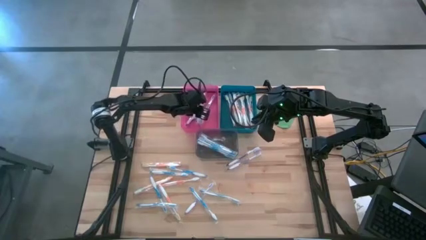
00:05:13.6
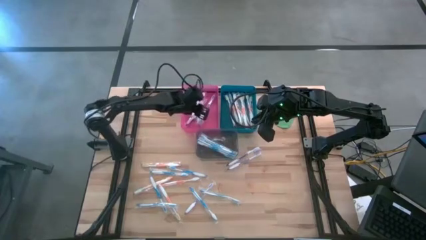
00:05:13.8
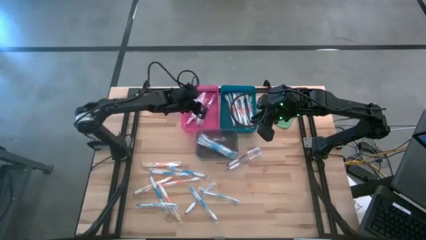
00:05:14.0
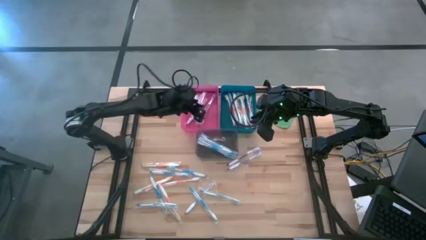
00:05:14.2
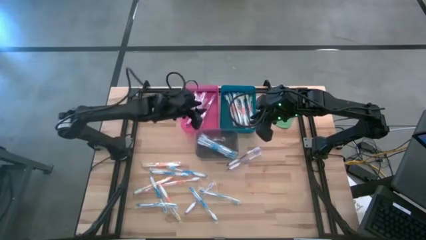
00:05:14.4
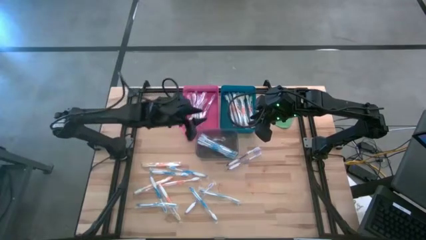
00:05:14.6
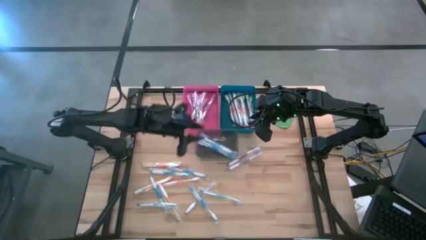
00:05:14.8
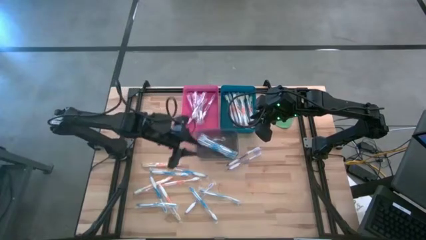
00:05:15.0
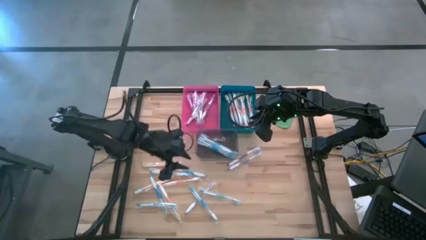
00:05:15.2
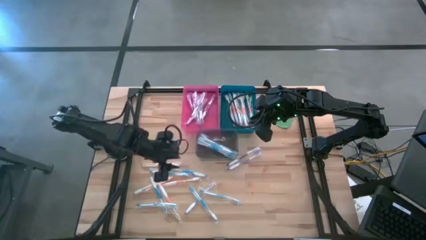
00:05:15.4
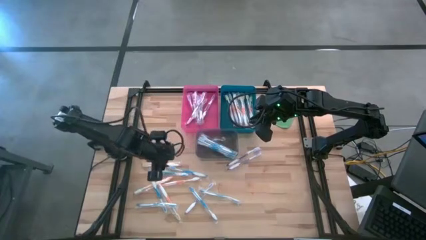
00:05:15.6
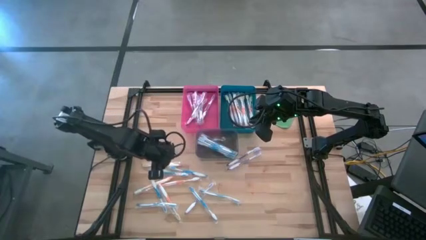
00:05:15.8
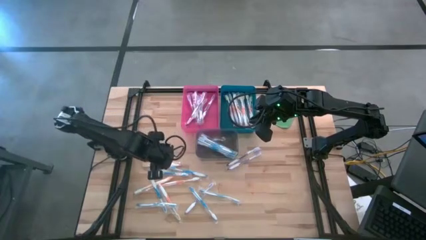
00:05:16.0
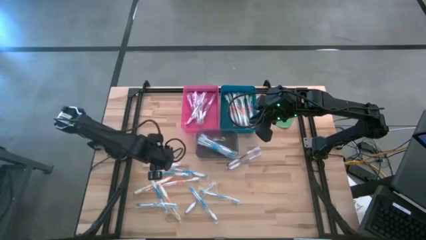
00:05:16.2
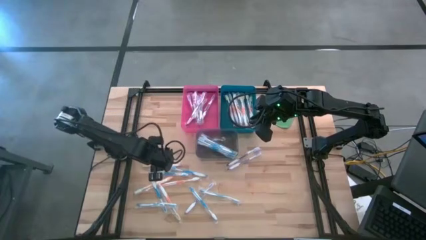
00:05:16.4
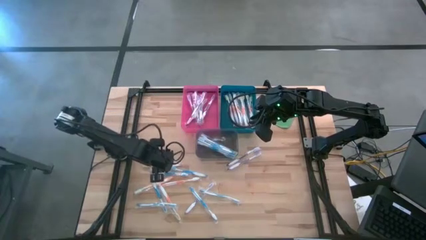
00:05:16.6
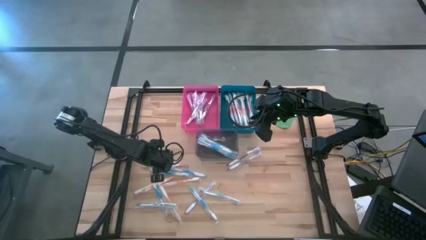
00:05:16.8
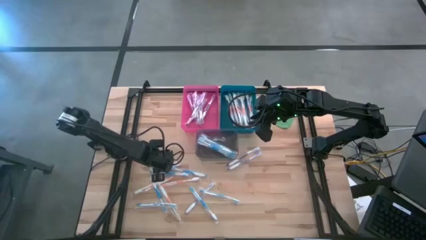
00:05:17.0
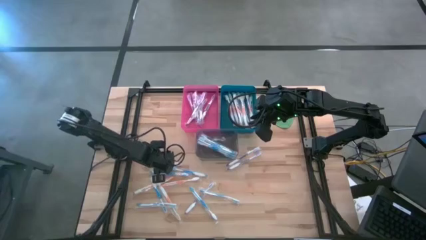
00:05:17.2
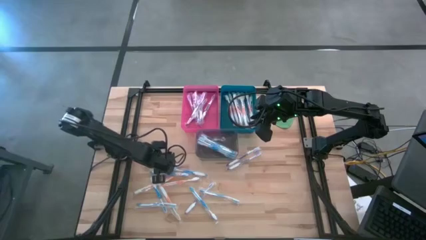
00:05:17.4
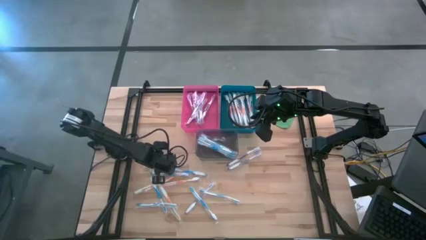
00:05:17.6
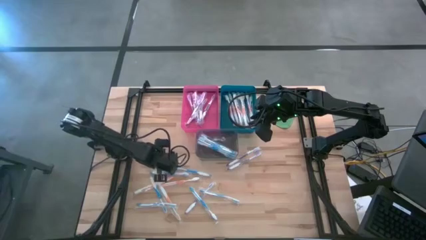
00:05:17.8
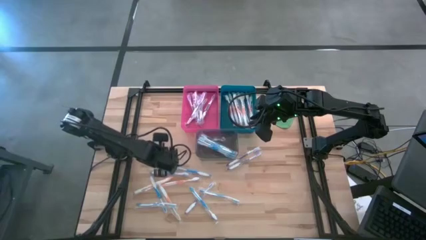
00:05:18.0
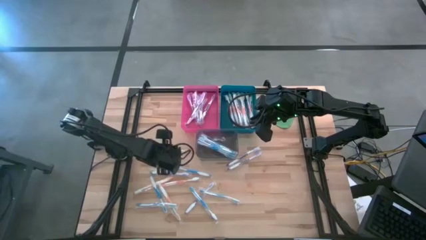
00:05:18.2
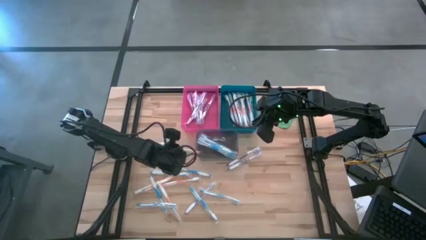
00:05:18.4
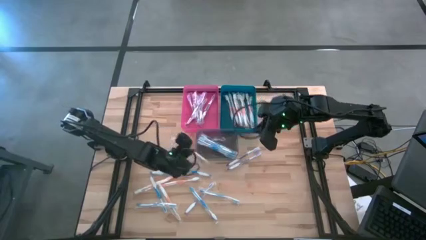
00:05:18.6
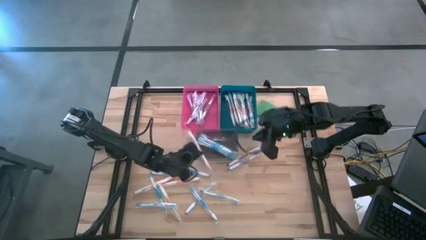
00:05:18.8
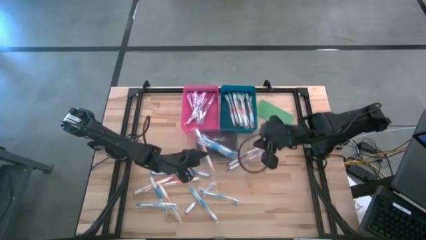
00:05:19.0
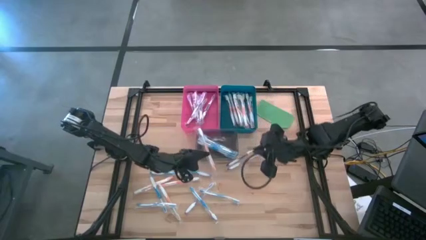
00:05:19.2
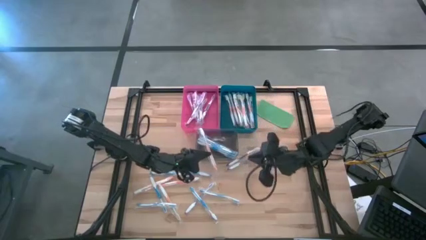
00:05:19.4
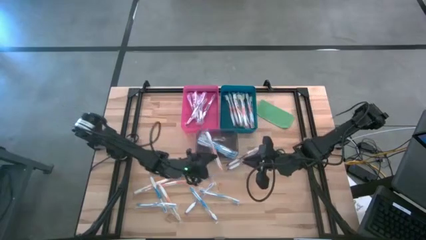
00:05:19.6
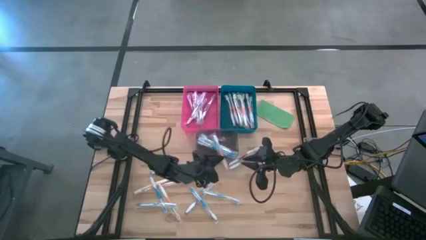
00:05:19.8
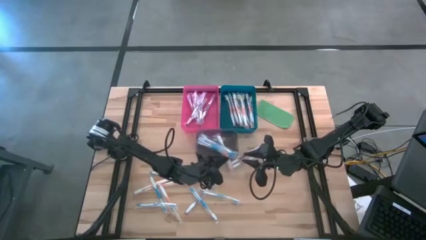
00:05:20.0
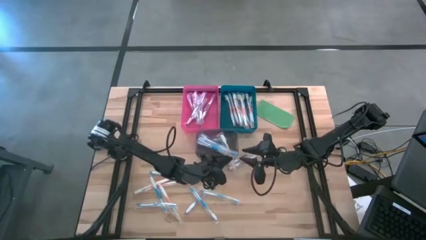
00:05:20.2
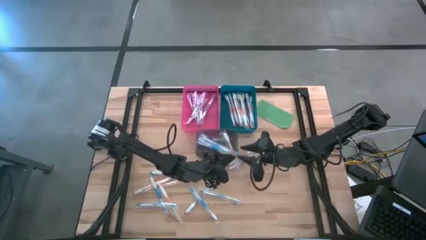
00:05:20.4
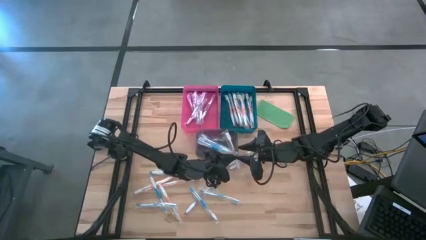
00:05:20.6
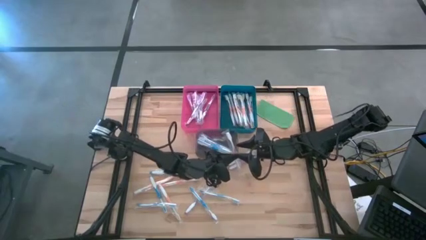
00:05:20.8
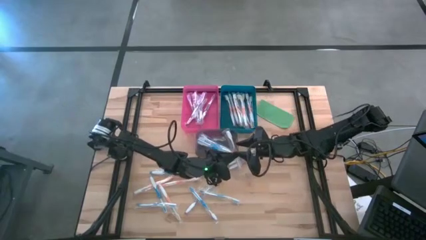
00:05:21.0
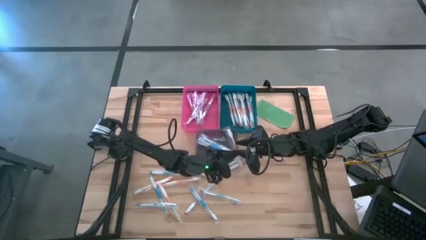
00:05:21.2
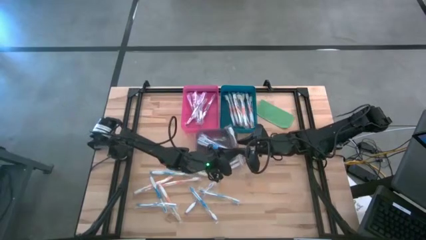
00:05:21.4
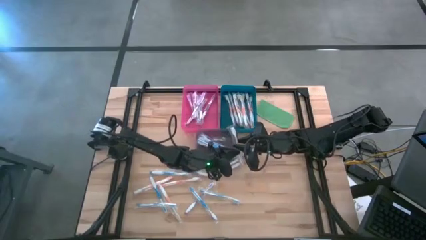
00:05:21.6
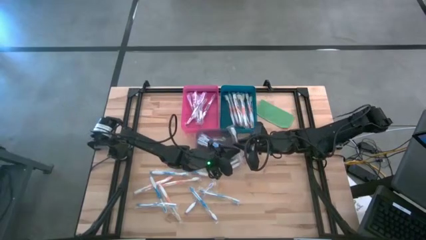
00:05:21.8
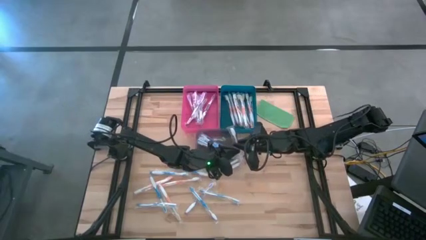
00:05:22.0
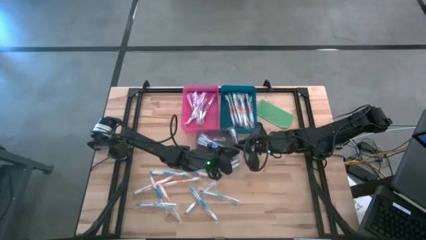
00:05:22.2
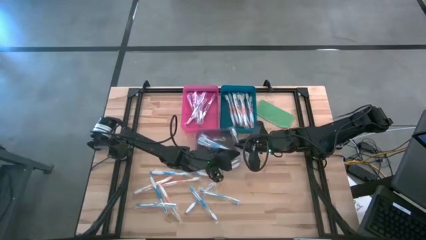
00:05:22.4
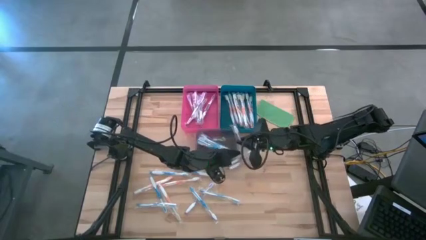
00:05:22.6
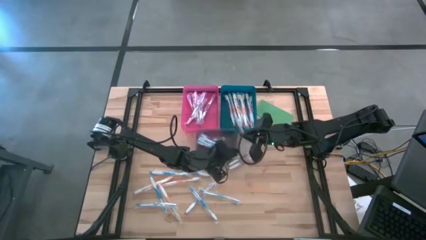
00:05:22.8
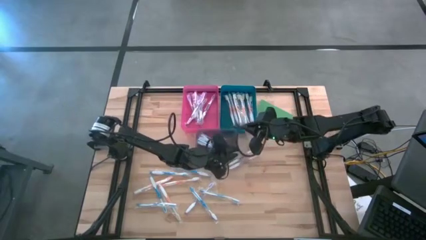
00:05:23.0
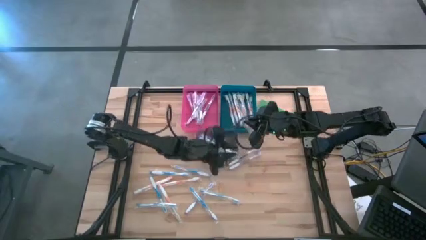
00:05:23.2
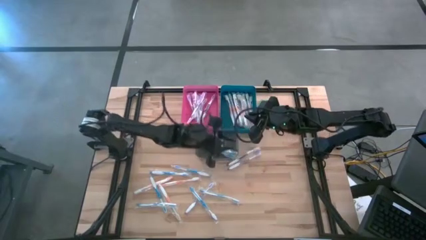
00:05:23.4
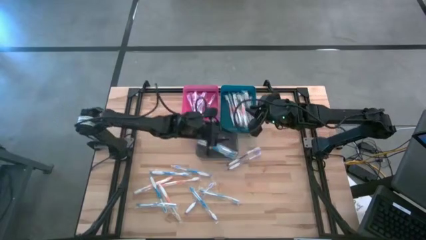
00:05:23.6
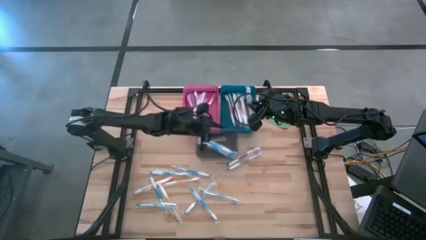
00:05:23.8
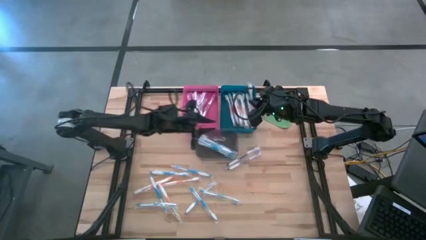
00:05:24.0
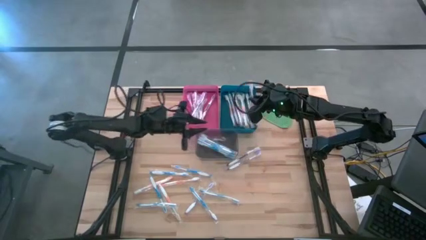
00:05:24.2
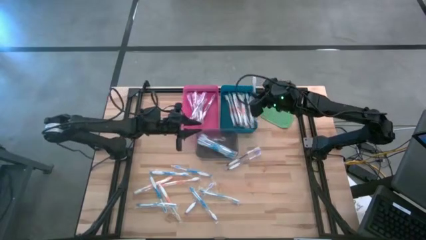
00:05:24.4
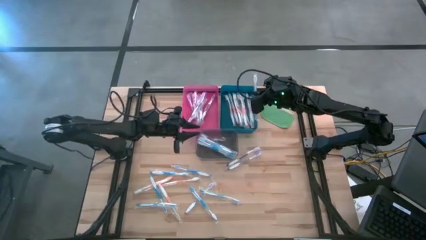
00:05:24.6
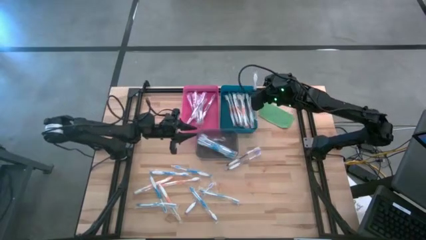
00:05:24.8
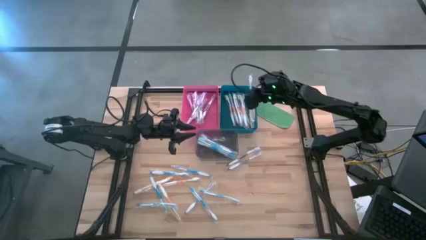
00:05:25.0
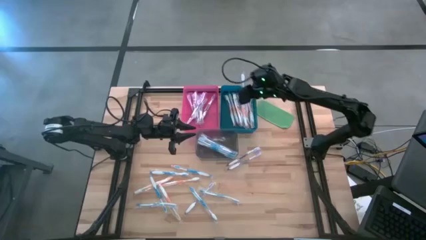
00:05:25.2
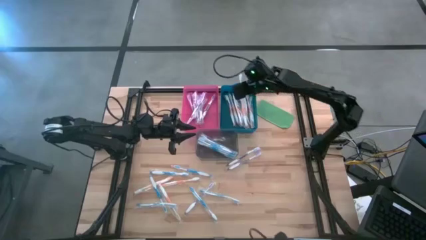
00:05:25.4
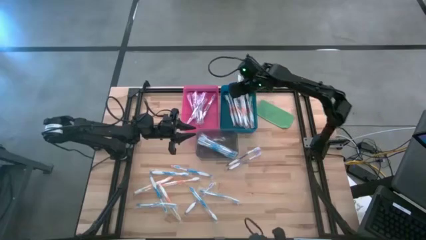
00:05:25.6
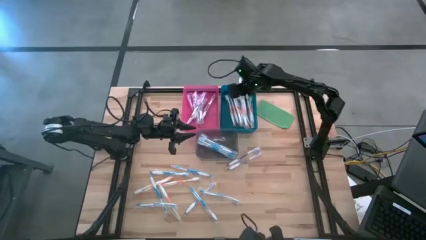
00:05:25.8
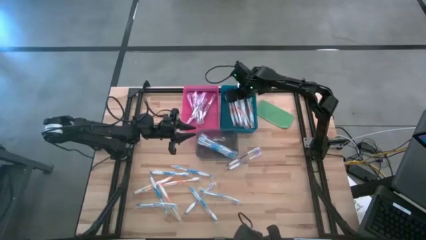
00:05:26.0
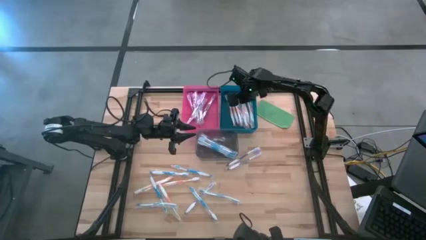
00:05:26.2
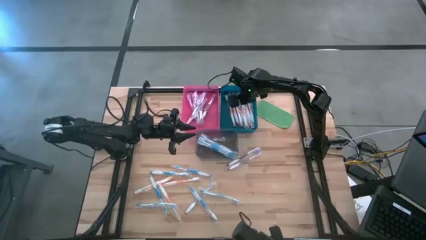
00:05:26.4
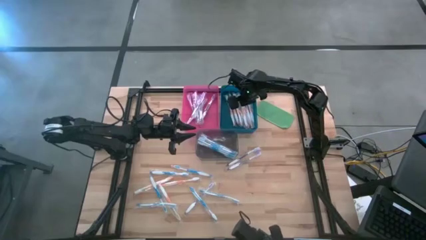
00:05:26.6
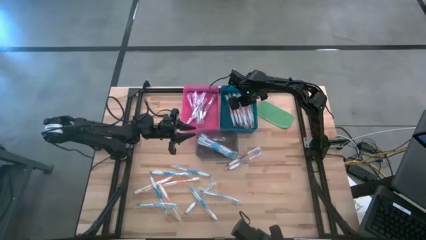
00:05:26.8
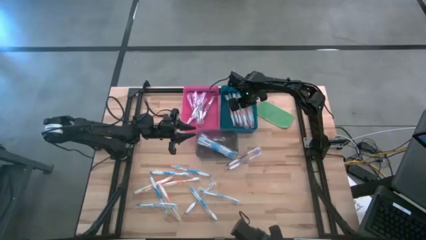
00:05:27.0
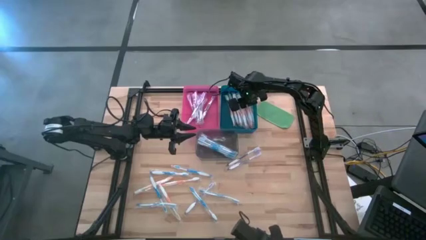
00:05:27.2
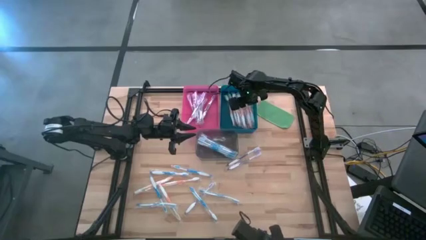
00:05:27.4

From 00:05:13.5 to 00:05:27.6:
Task: Pick & Place Toothbrushes
Put the orange toothbrush into the blue bin

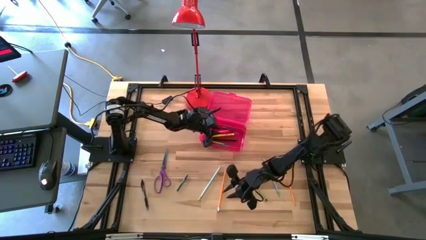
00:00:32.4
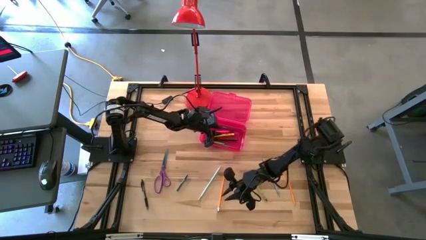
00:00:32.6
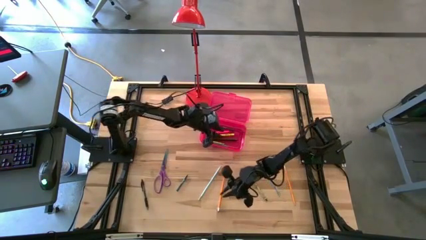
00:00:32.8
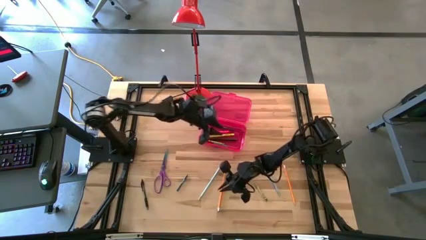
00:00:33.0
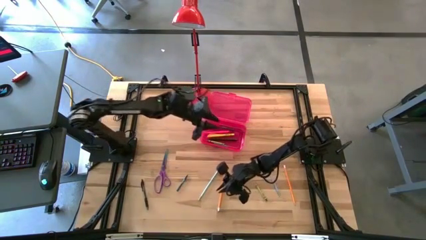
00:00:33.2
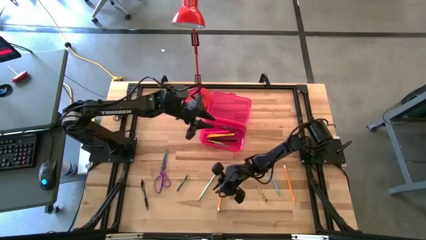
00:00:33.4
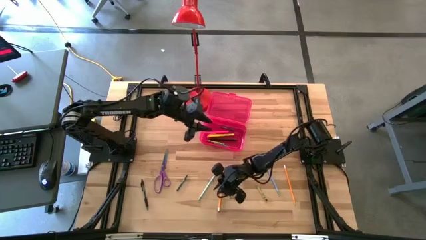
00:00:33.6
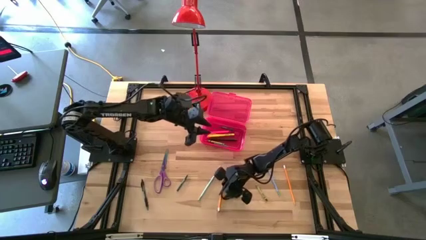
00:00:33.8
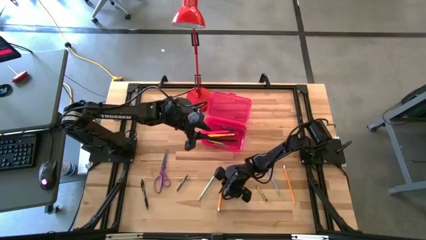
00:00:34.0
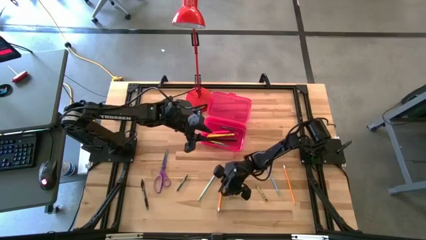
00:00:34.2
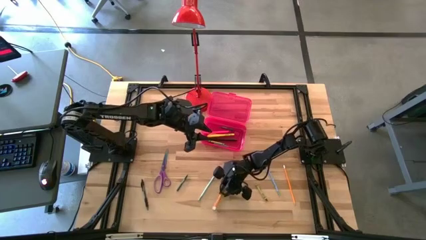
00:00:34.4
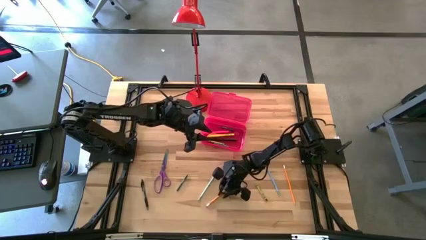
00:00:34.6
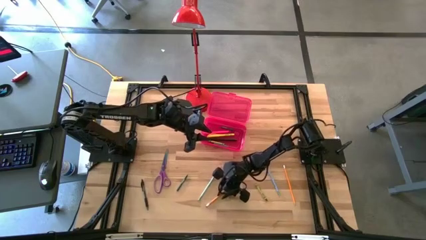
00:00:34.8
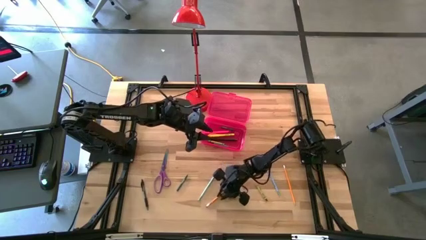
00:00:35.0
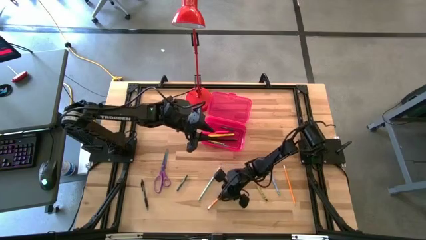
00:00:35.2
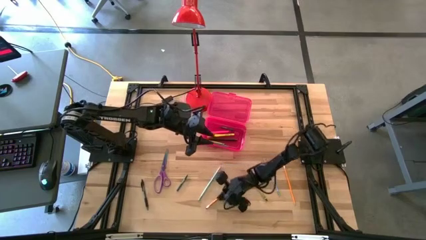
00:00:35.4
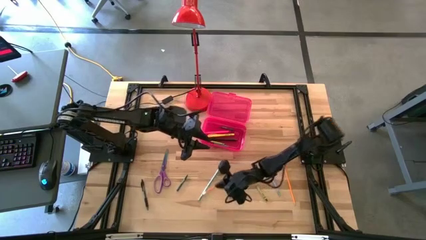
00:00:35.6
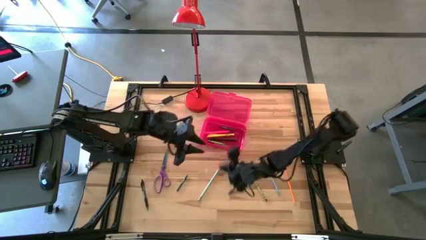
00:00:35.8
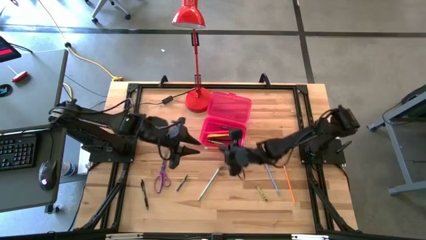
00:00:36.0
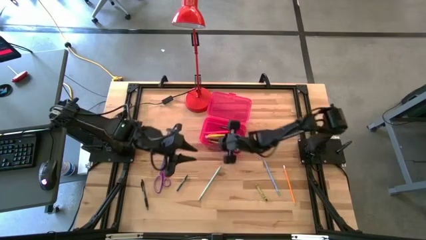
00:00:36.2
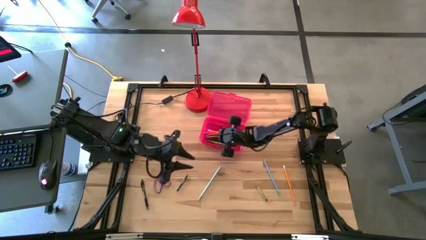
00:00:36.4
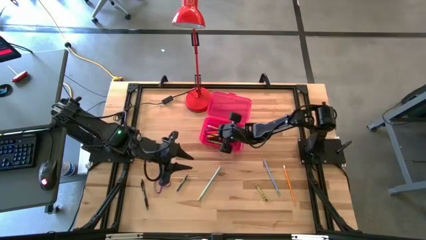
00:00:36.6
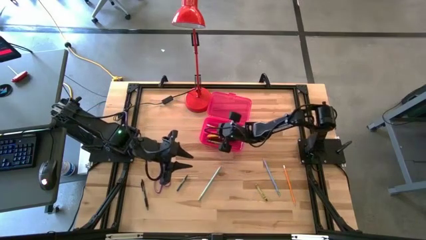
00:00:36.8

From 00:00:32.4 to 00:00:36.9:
Task: Pick & place school supplies into a supply box
Put the orange pencil into the pink supply box
